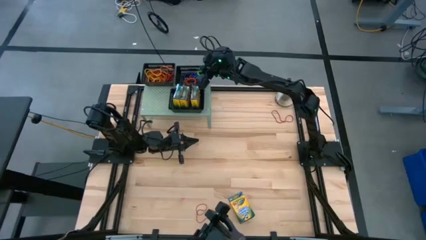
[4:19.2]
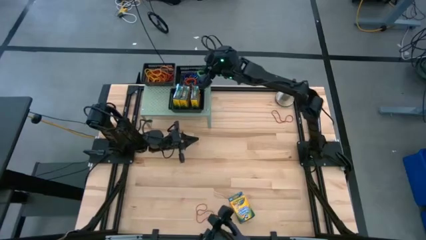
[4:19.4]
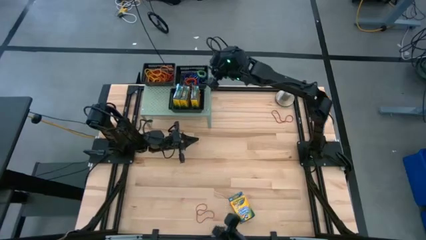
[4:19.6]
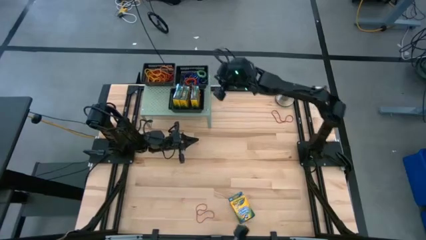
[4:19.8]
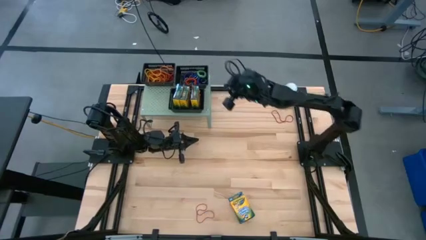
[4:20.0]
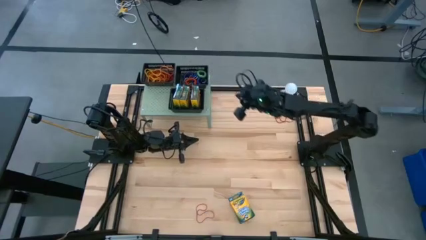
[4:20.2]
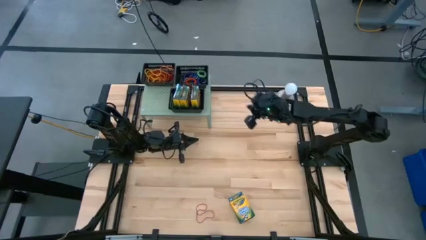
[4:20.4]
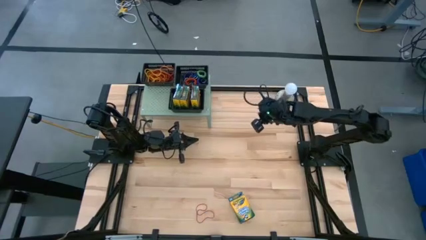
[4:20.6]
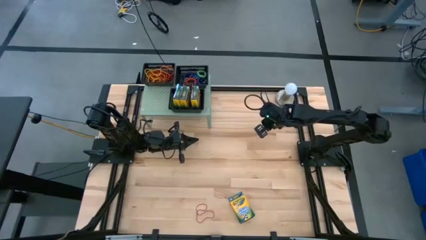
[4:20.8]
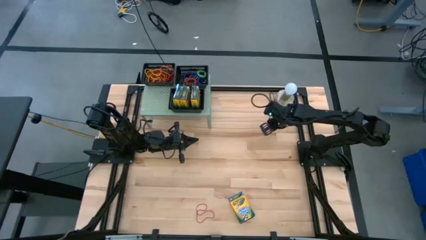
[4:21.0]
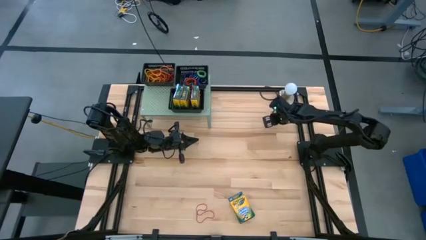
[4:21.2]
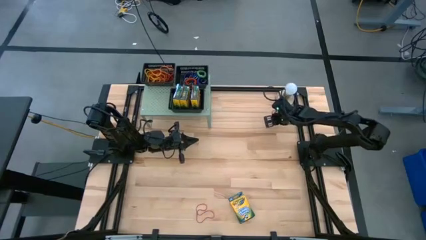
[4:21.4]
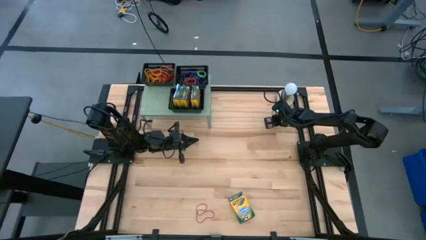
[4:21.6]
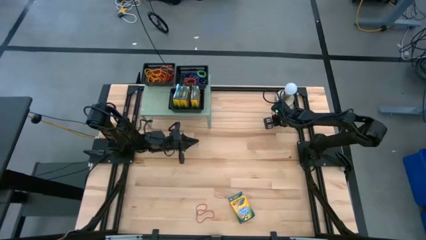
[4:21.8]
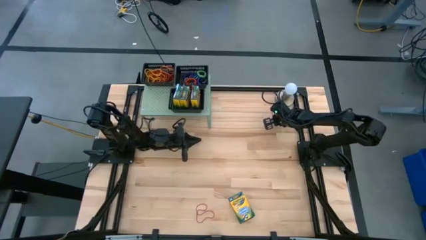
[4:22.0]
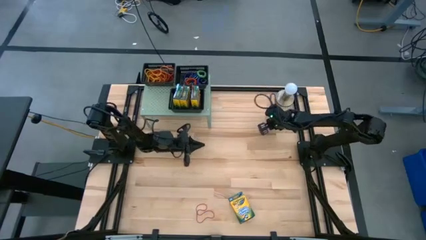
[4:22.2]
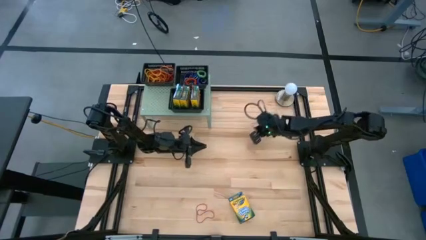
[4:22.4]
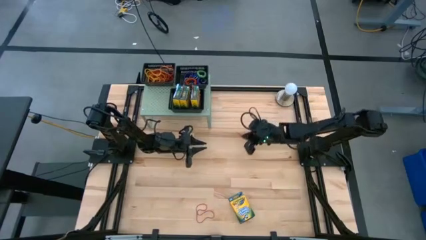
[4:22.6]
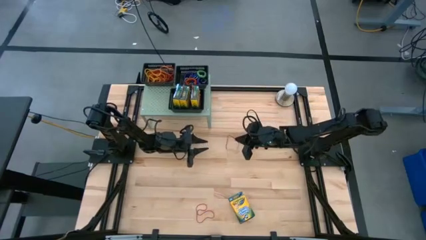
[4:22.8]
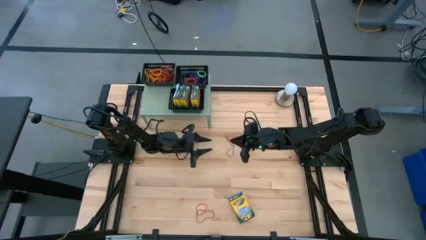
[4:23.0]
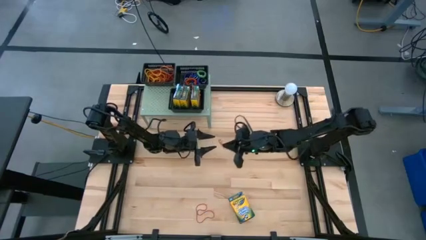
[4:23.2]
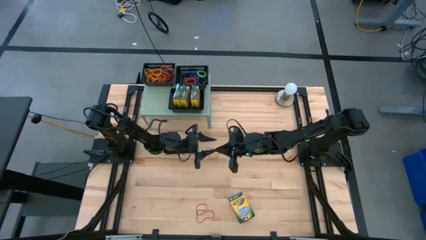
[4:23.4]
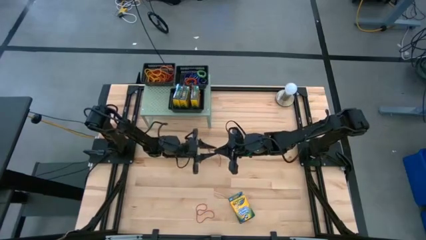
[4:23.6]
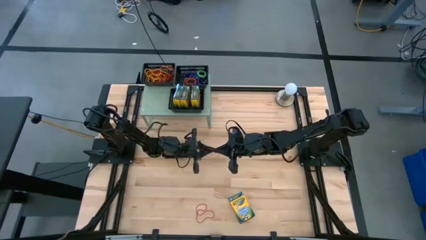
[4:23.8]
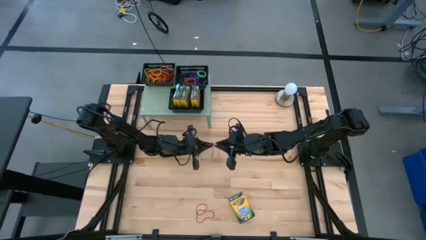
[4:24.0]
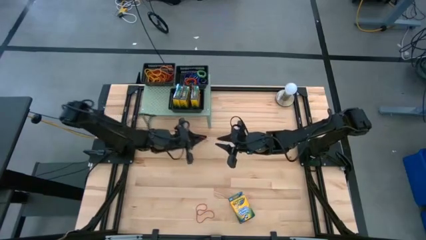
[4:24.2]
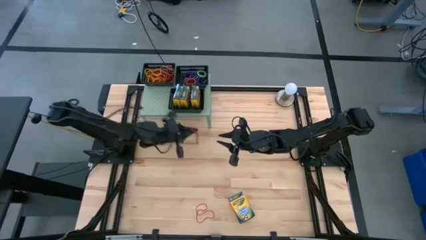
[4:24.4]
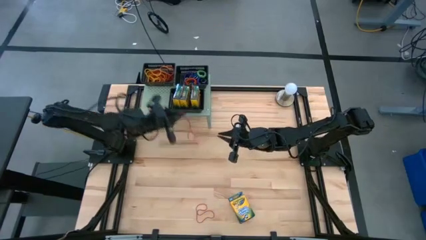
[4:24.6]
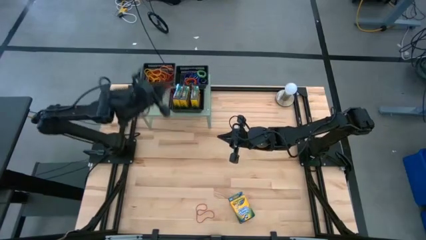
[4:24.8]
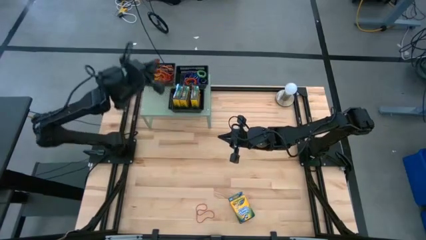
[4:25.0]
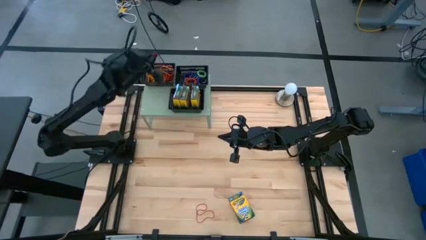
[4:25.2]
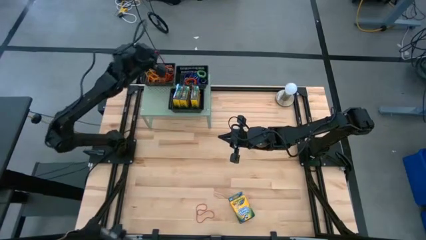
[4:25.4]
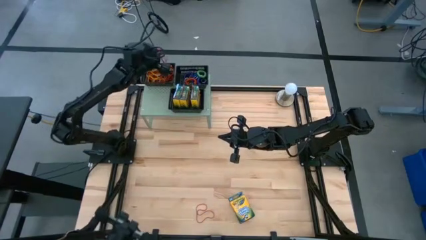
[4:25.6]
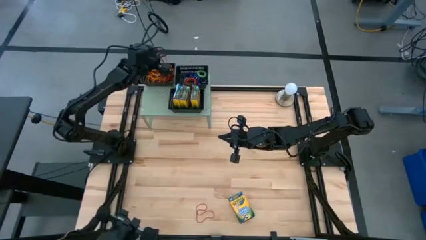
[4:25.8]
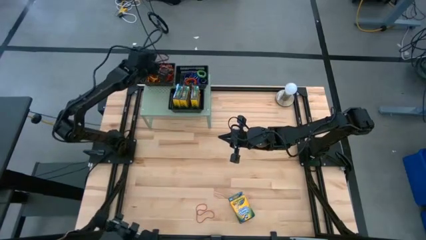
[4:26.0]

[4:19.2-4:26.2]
Task: Pick & Place Office Desk Supplies
Put the red rubber band into the top left black bin on the shelf

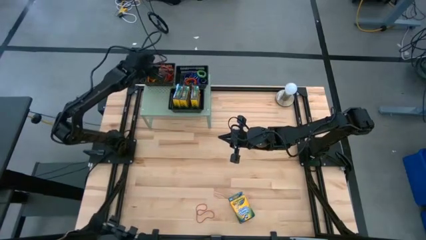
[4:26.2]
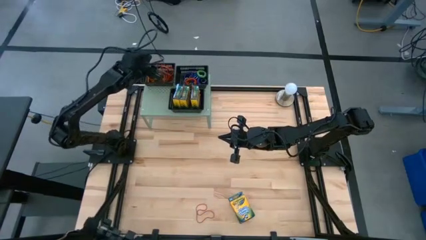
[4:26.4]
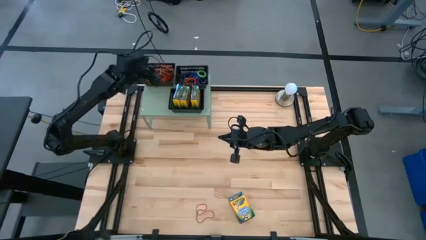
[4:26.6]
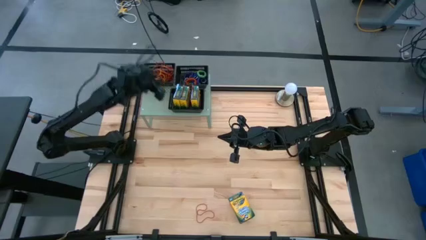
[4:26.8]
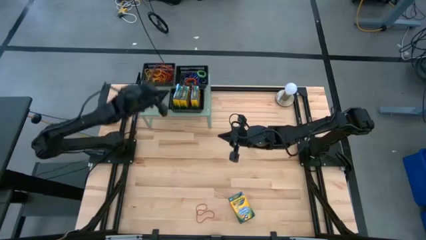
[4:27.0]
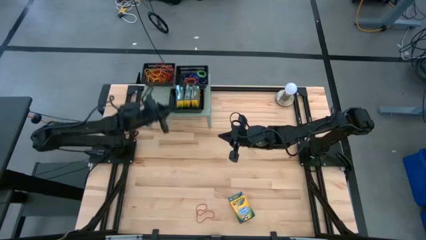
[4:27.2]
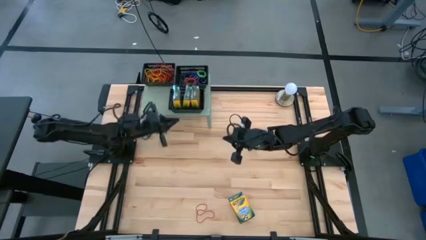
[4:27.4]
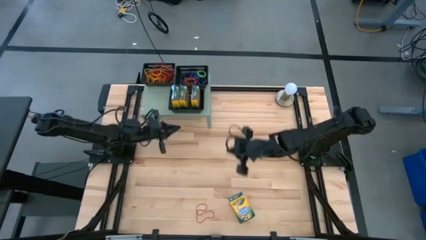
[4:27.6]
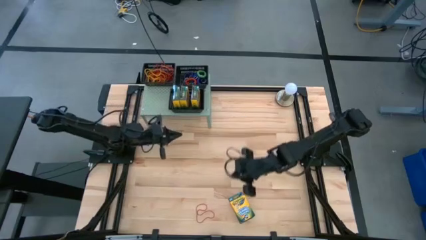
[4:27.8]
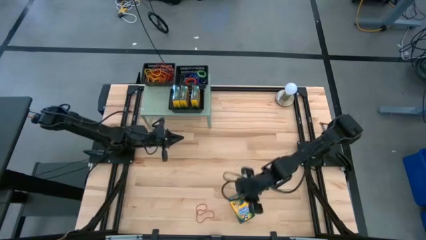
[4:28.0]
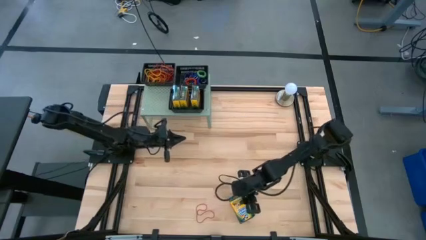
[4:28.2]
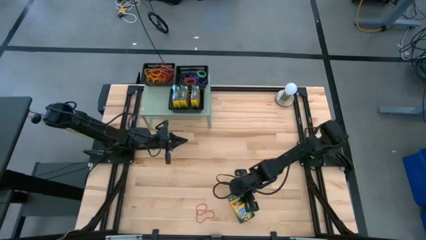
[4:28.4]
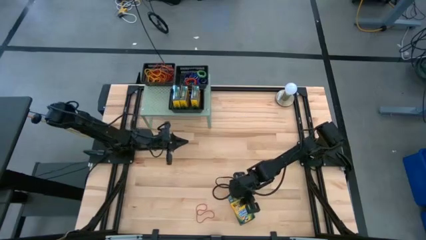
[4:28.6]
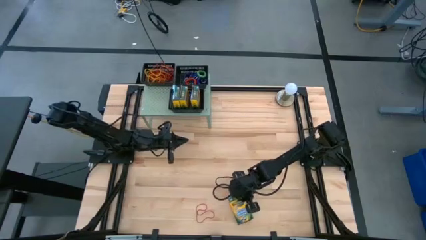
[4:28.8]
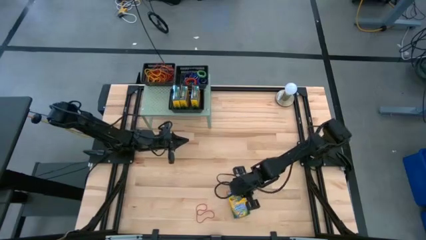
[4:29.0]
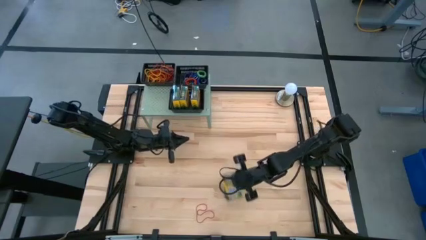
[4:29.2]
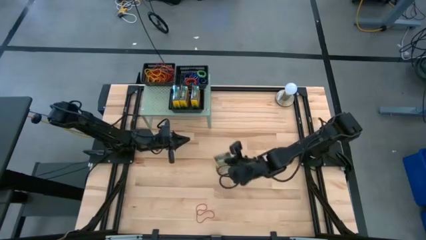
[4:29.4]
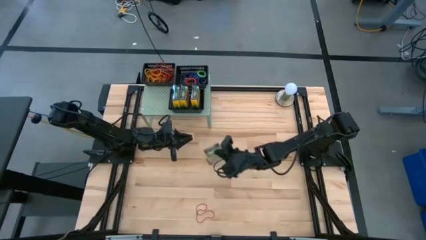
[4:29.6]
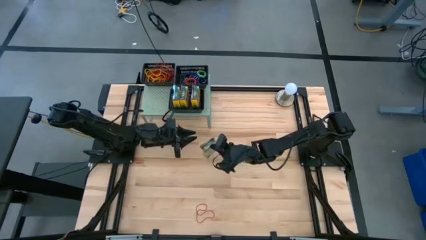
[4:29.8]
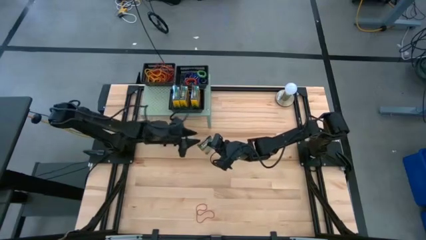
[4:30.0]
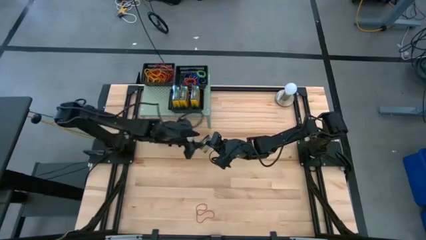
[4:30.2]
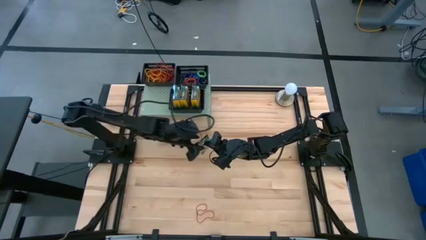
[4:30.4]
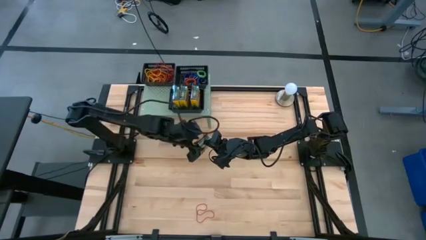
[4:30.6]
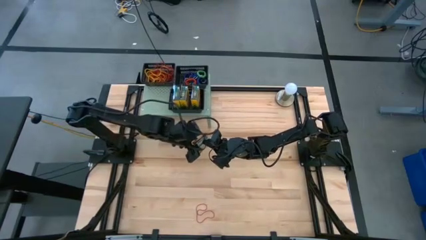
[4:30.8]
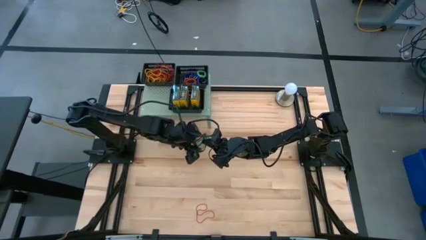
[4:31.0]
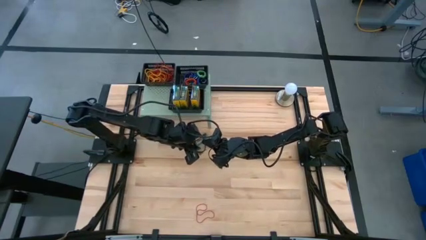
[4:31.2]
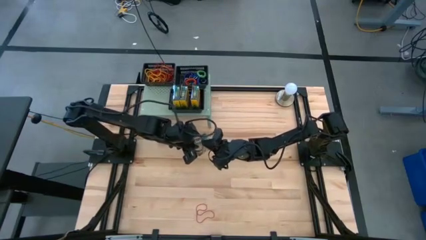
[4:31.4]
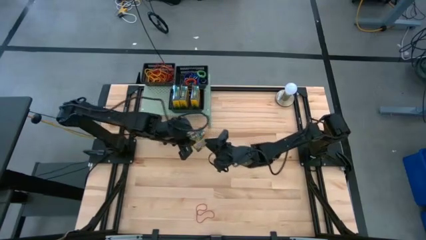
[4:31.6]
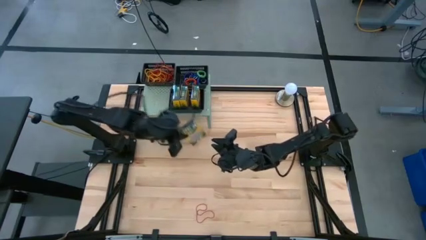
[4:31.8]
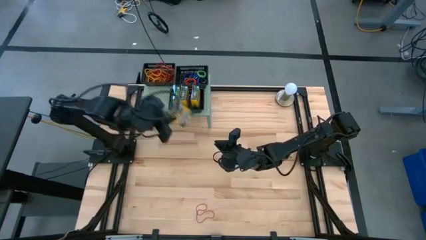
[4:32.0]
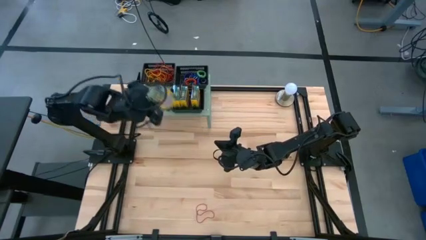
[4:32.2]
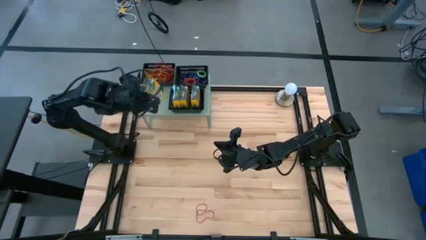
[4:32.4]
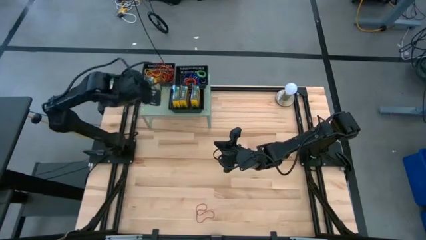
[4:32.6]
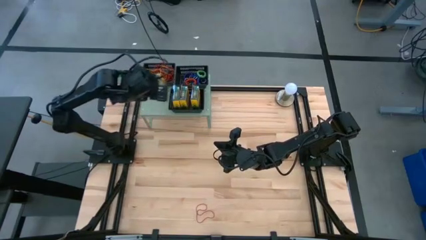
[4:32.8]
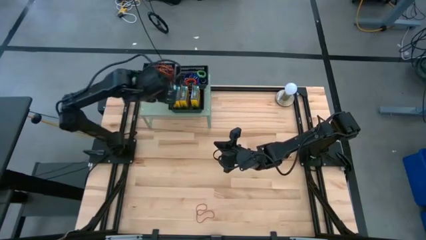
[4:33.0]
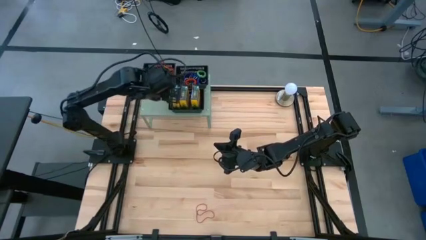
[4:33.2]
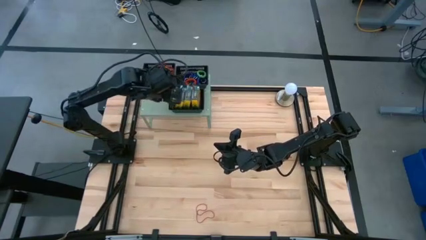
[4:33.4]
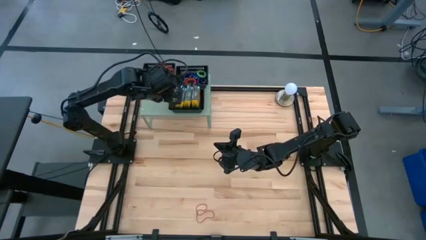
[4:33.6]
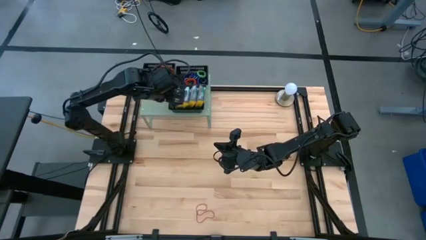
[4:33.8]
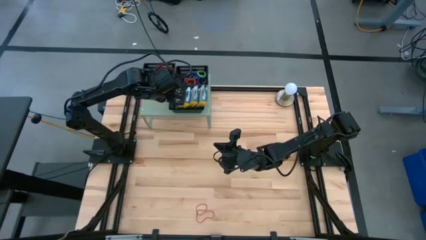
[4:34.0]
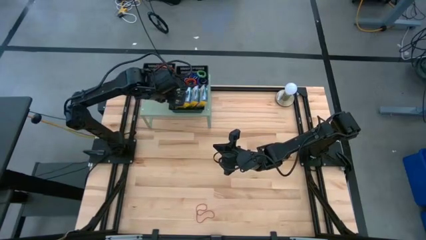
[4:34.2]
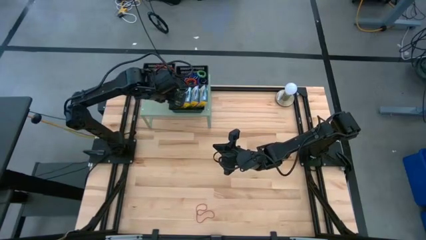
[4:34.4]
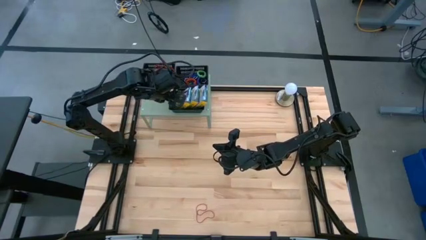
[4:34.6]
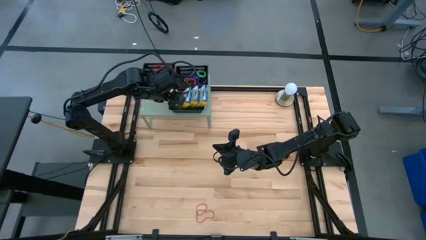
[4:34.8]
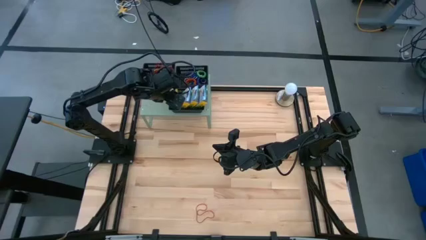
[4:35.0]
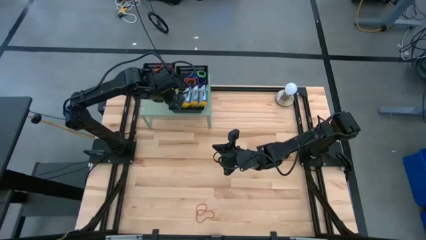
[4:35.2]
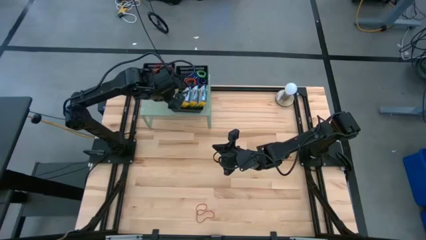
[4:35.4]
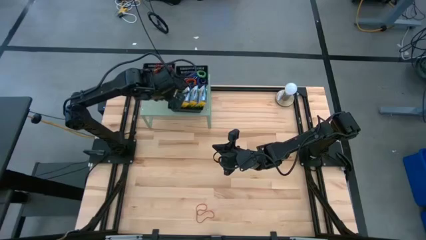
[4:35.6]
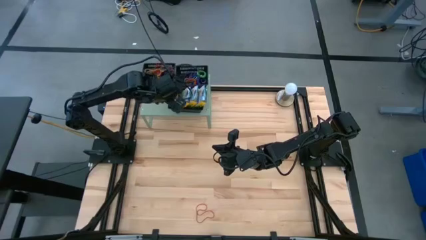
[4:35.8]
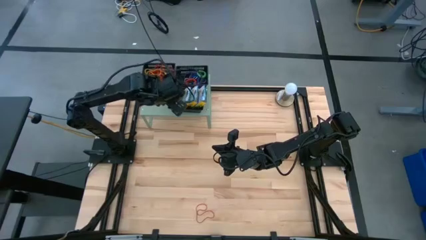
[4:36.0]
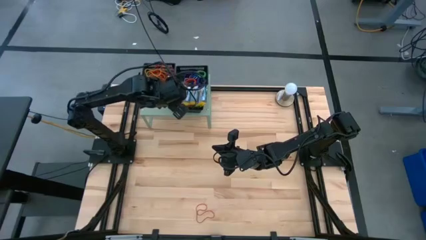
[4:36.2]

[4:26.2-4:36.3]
Put the crayon box into the bottom black bin on the shelf
